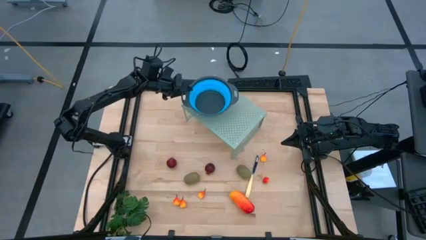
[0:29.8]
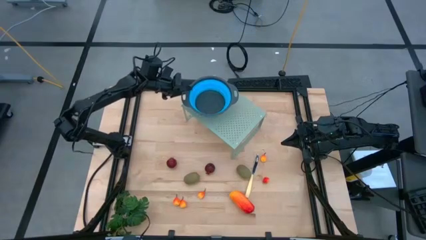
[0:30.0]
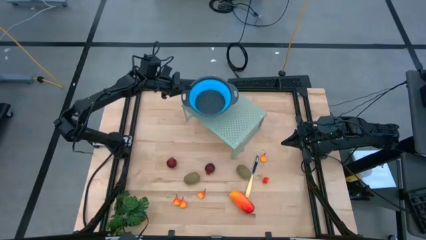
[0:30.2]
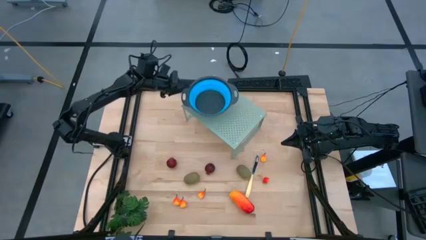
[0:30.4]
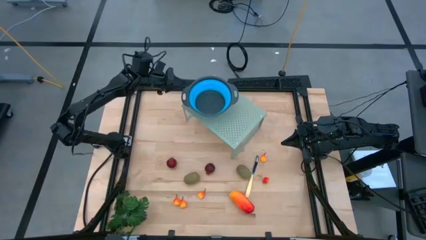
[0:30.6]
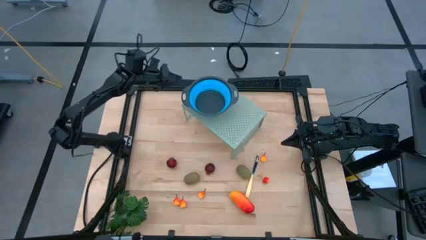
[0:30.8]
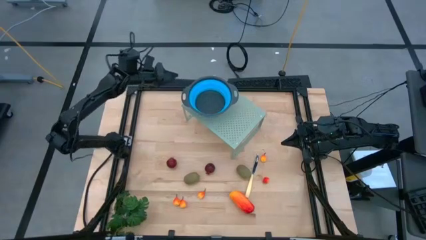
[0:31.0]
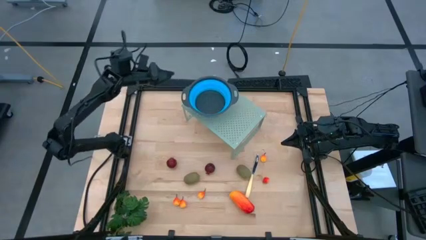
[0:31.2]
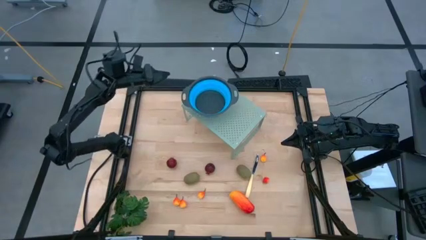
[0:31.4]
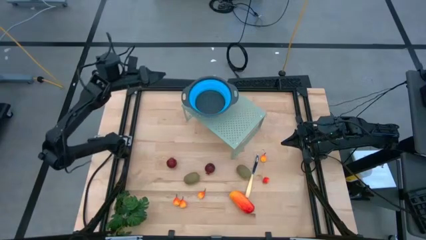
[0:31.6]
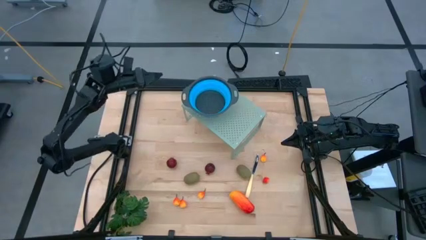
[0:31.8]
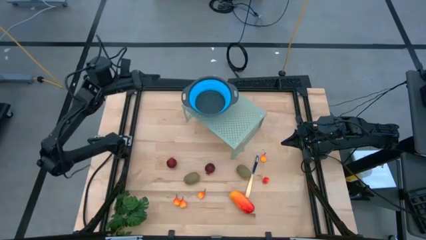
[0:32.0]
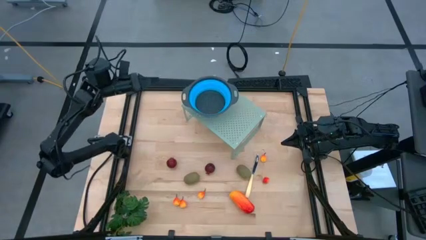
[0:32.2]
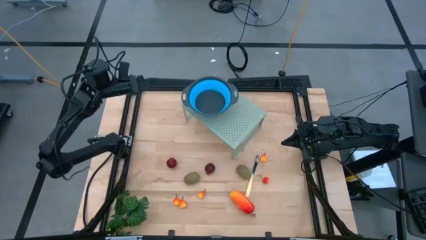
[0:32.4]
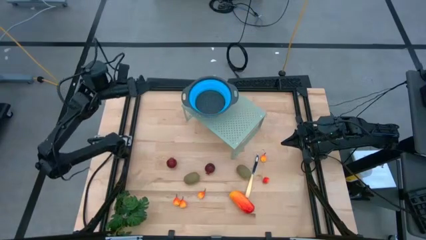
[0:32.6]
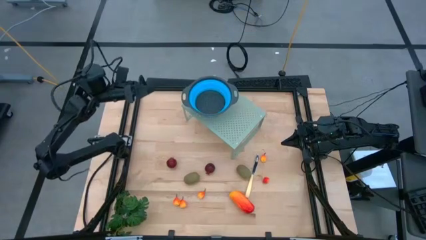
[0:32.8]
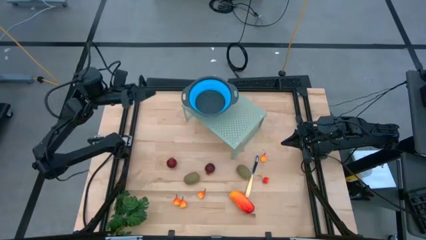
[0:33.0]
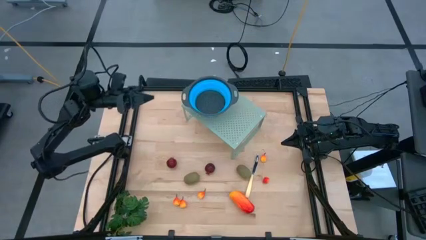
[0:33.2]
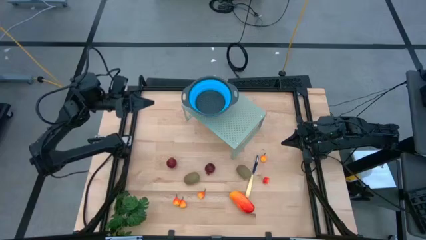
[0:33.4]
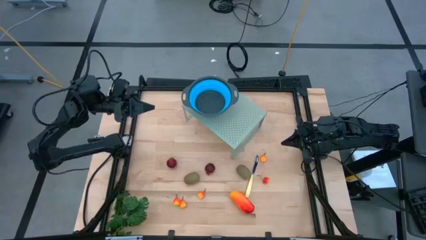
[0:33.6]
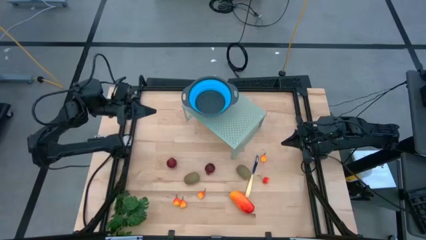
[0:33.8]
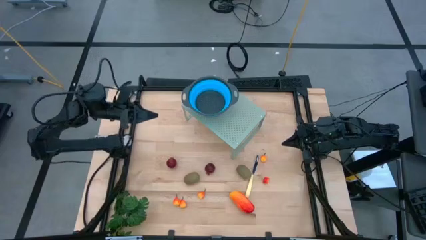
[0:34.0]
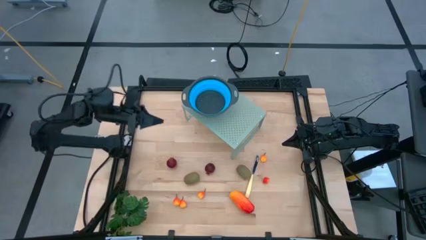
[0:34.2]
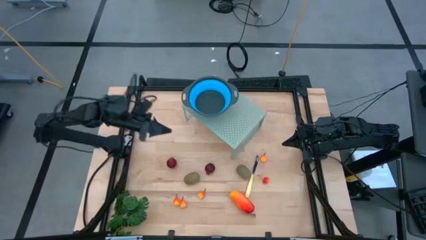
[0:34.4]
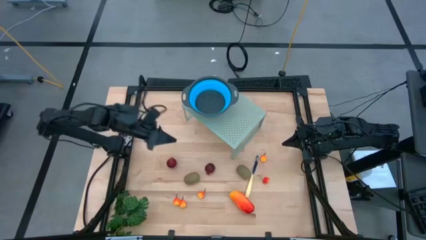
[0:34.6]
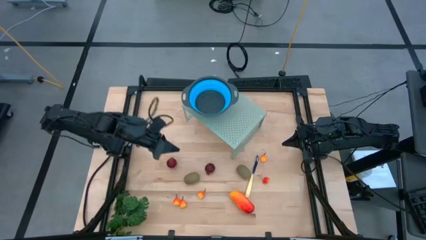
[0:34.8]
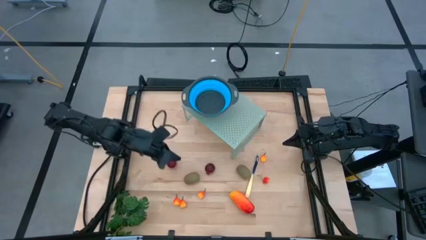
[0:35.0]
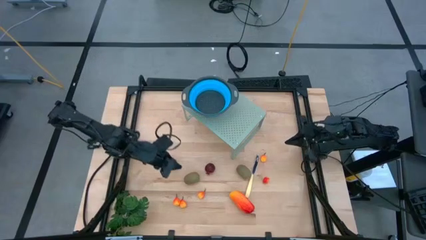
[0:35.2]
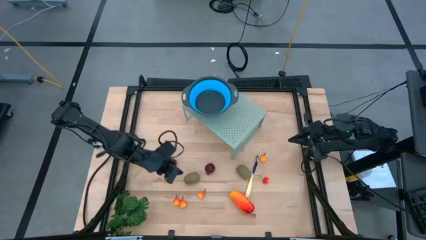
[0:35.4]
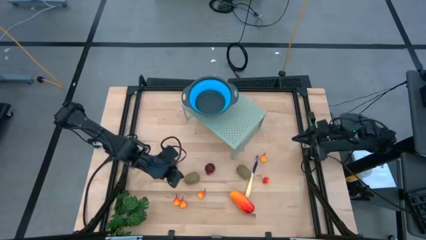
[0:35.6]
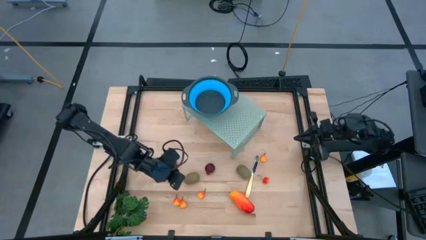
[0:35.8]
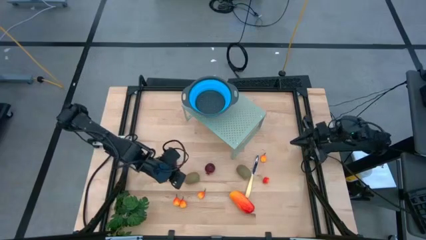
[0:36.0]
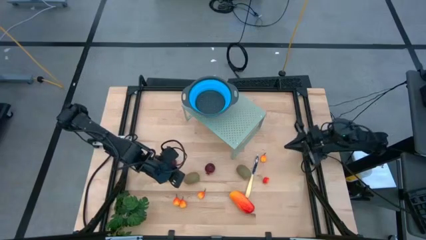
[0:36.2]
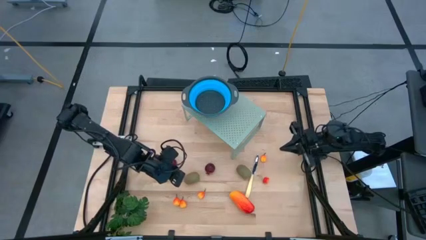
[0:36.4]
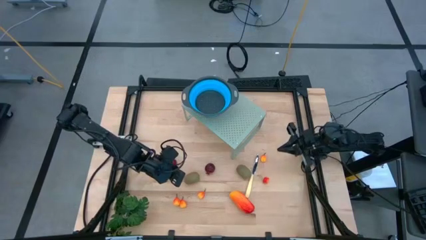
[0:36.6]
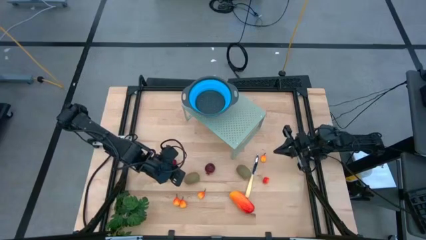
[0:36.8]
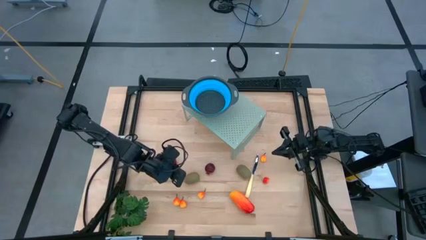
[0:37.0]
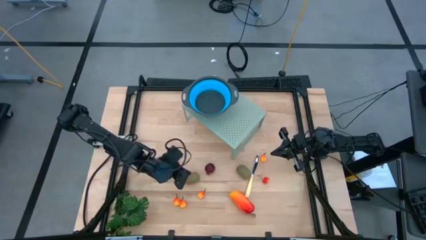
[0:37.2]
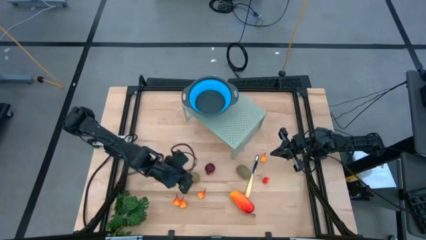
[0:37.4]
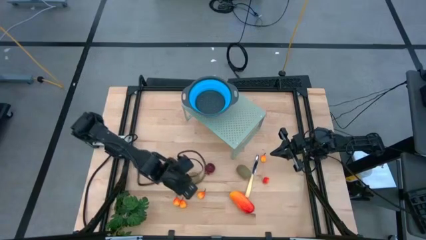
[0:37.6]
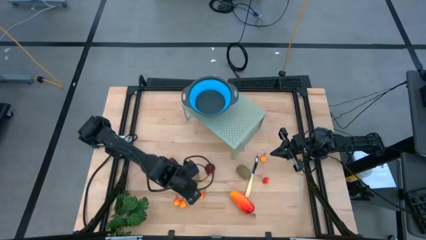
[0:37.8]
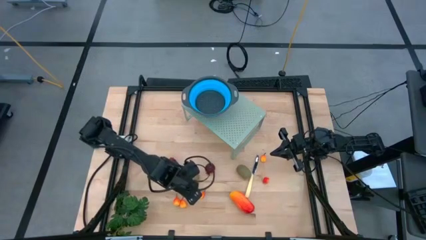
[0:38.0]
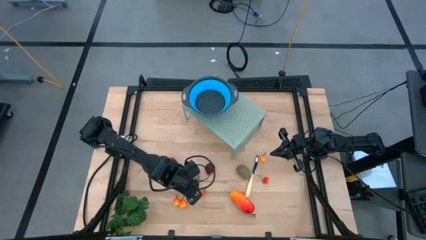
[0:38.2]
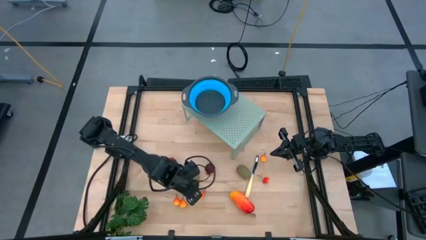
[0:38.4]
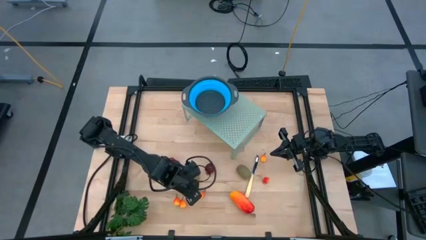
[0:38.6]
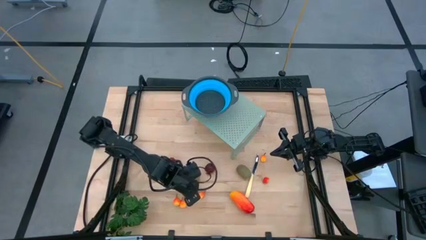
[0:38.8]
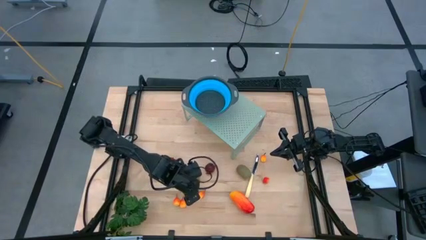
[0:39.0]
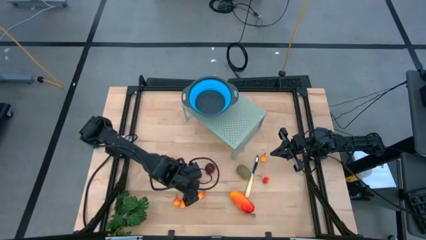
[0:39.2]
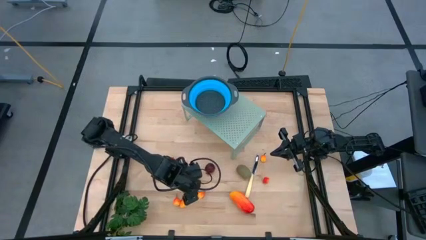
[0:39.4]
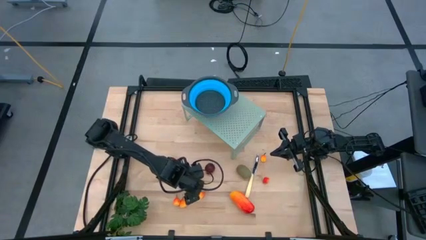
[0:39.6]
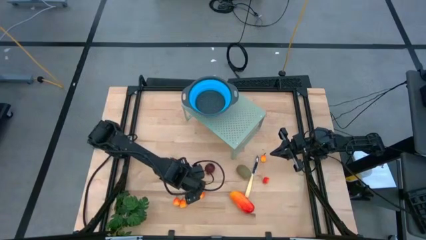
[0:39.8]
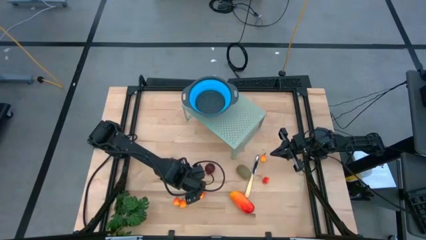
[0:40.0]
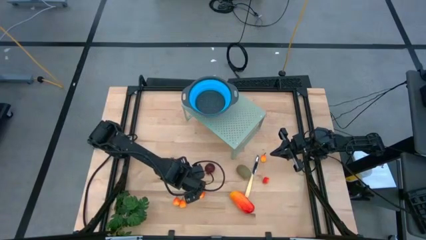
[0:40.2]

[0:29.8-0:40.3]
Task: Pick & Place Fruit
Put the kiwi into the blue strainer bowl on the shelf

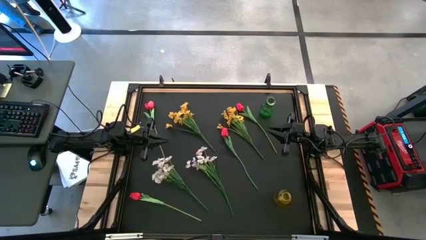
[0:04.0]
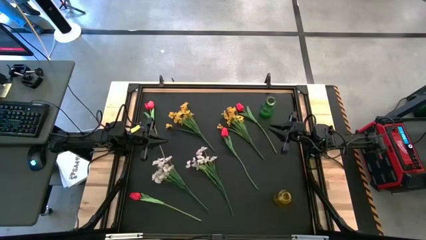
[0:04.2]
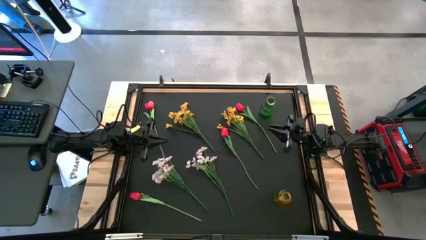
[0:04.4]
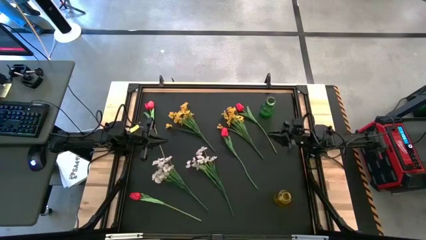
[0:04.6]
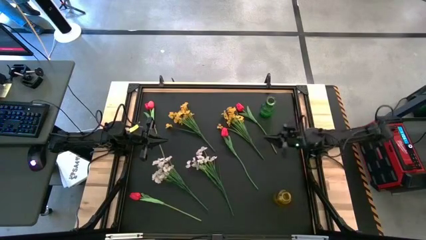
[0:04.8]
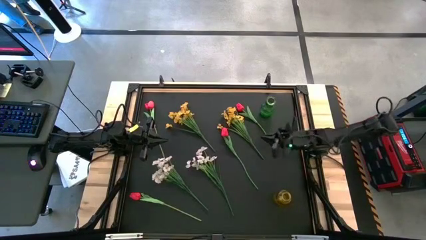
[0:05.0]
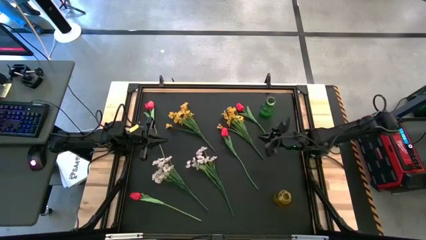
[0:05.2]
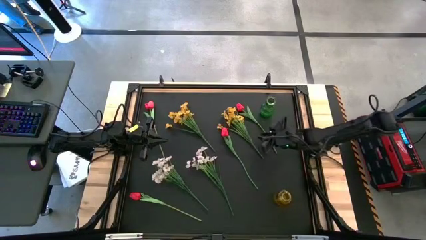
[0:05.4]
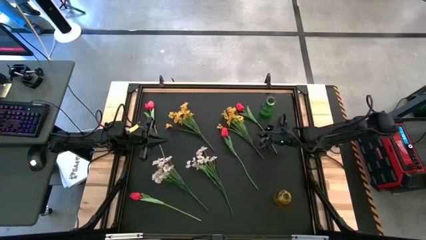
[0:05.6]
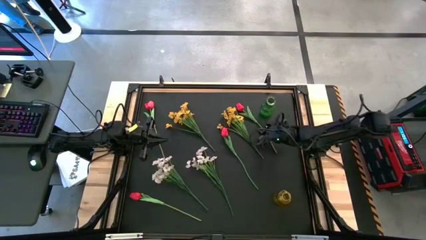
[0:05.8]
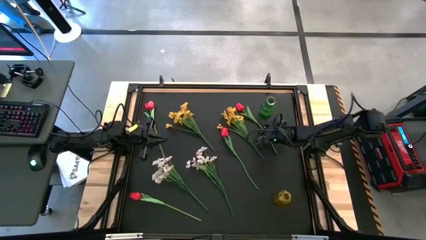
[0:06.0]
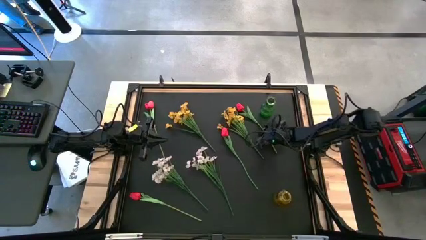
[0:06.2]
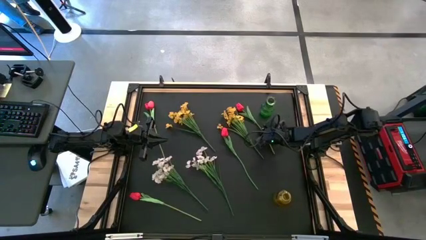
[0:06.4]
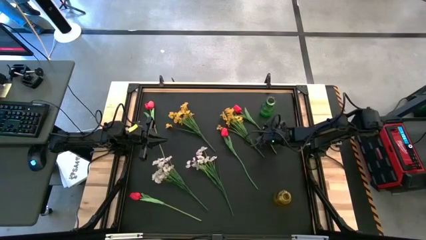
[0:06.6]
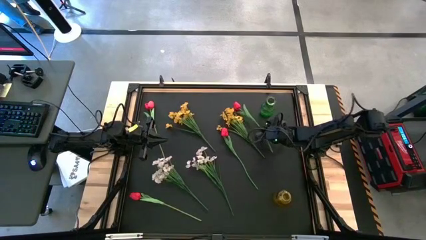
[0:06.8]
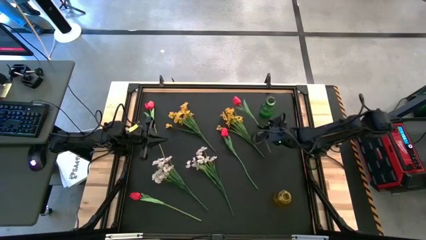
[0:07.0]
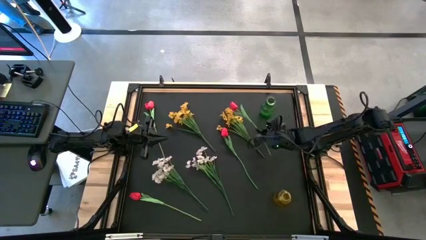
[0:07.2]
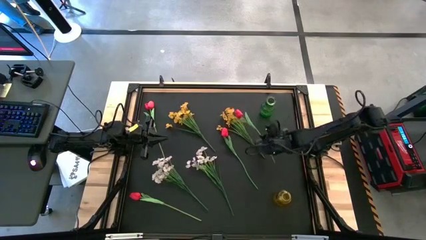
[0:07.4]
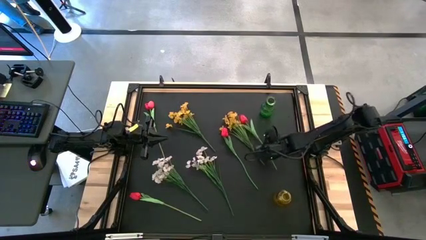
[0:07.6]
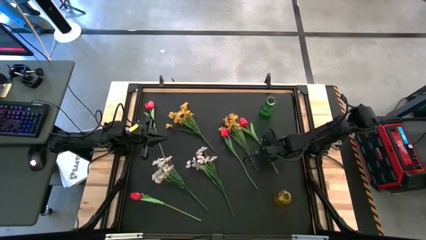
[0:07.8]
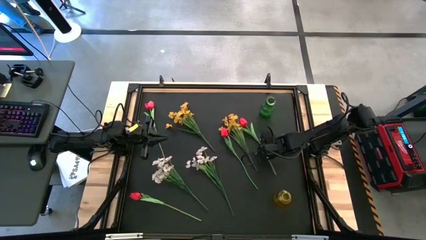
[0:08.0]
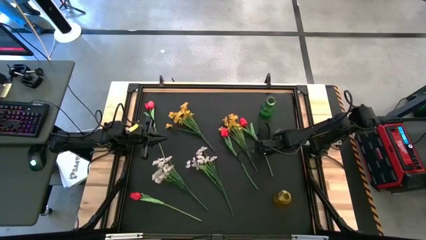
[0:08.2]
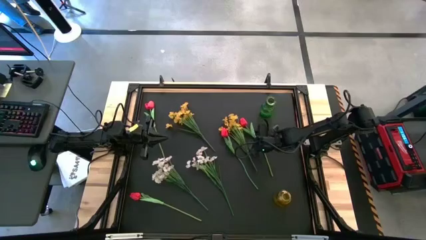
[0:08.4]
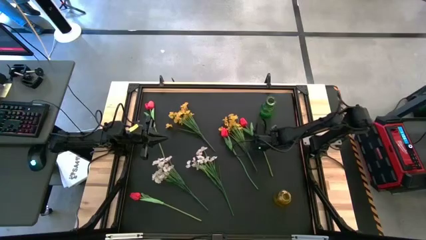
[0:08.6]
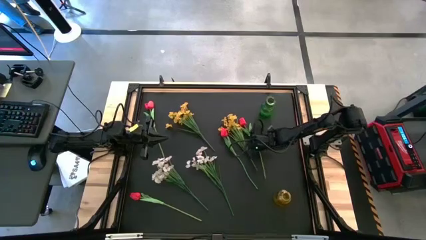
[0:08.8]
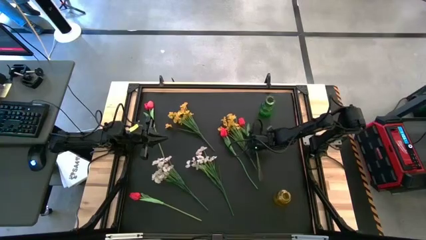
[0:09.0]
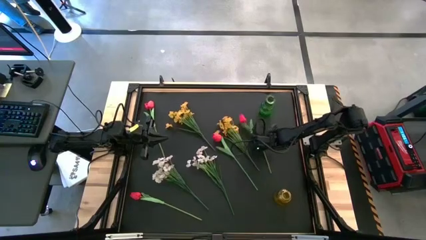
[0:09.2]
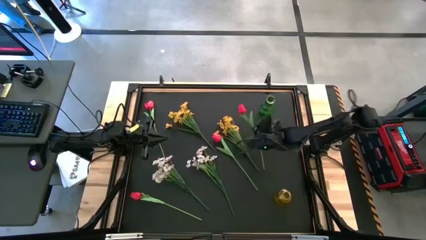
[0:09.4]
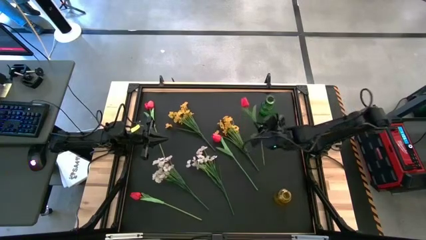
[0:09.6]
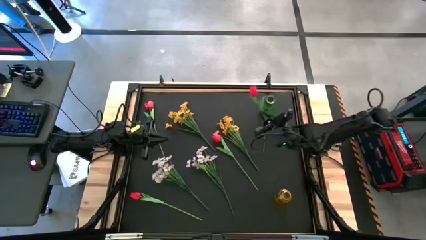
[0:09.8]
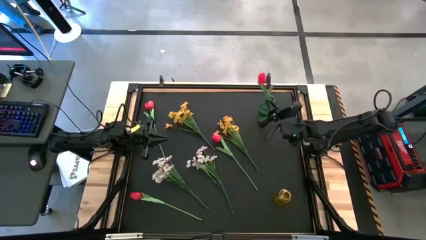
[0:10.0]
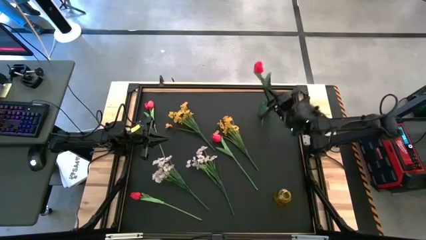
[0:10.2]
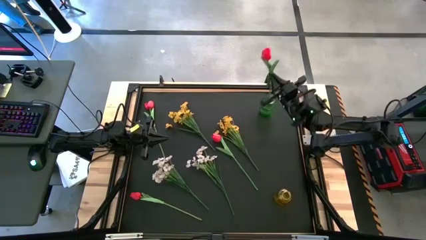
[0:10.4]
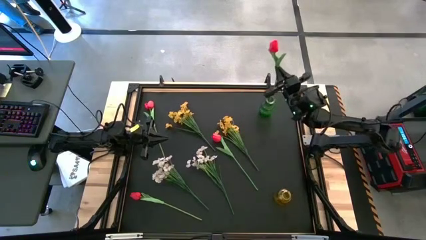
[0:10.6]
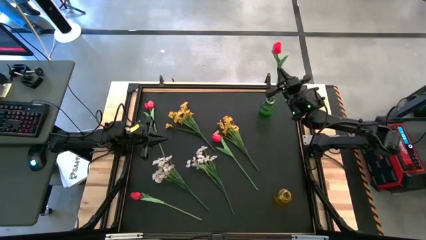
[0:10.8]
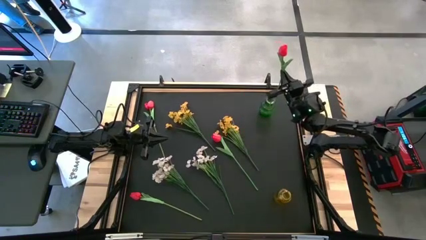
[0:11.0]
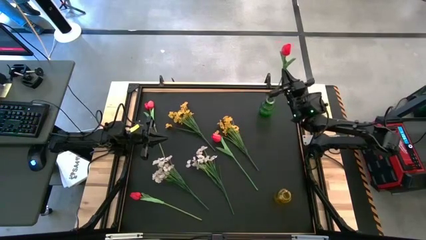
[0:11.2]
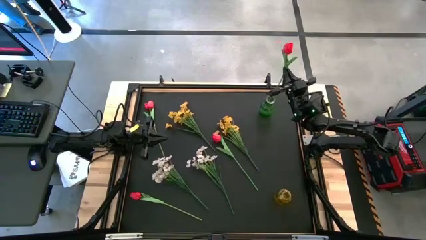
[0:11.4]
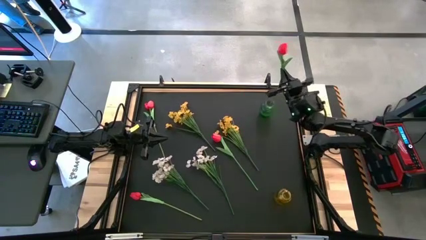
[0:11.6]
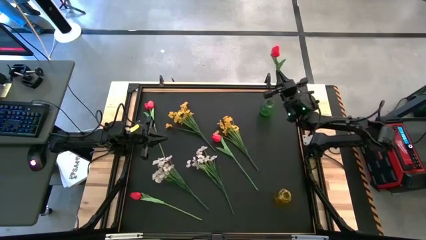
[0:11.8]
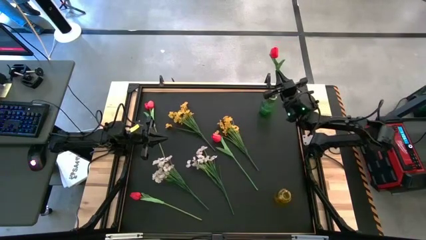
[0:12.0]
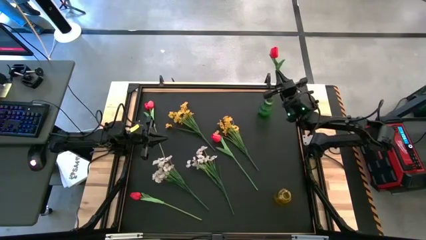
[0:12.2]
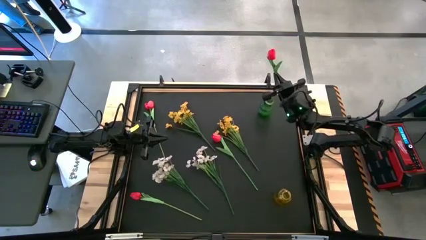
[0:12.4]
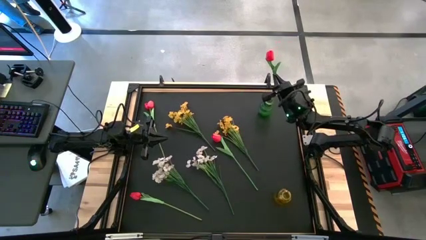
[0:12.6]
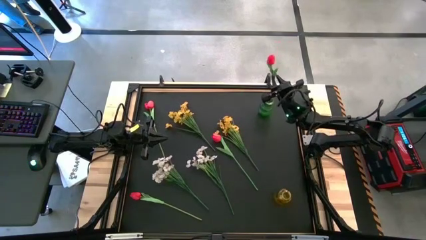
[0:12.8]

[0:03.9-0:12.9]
Task: Sort flowers into vase by color
Put the top right red flower into the green vase
